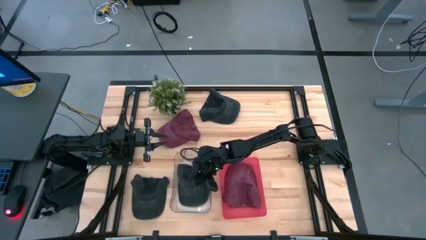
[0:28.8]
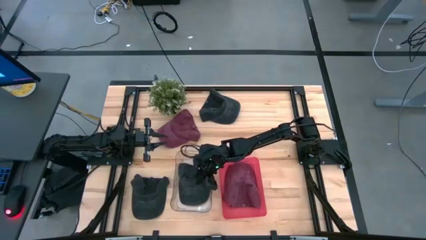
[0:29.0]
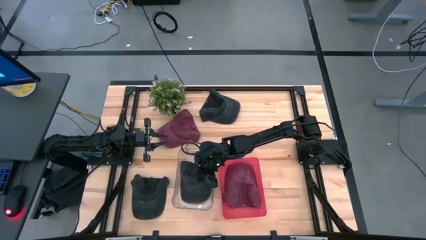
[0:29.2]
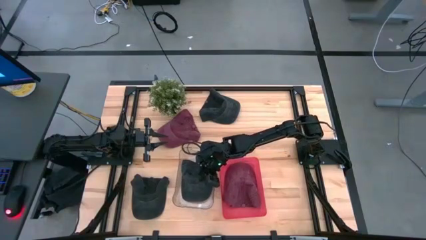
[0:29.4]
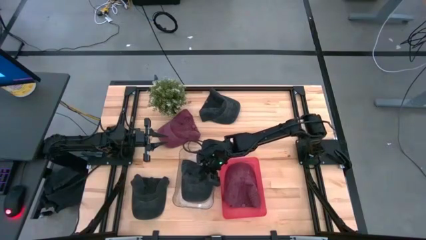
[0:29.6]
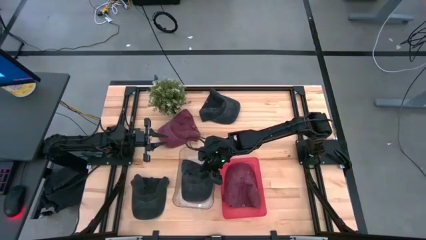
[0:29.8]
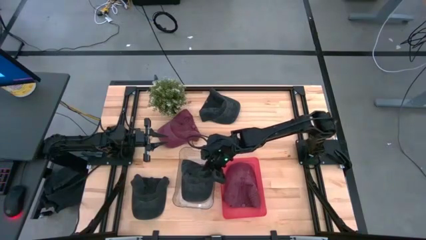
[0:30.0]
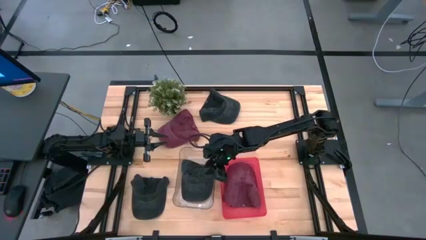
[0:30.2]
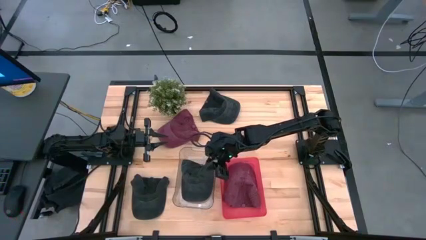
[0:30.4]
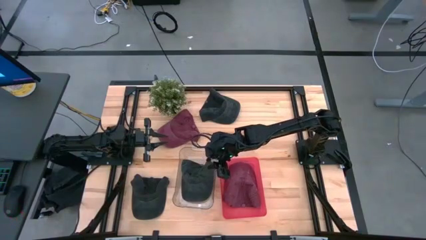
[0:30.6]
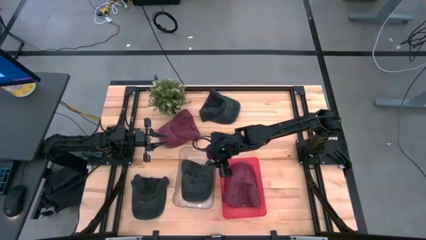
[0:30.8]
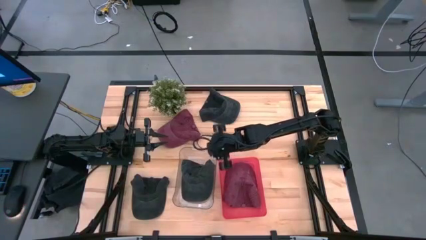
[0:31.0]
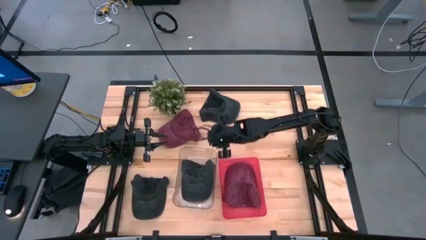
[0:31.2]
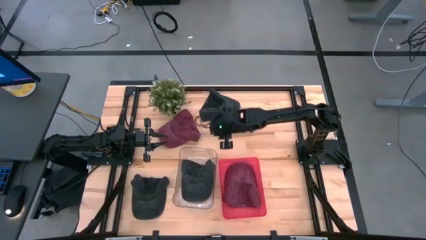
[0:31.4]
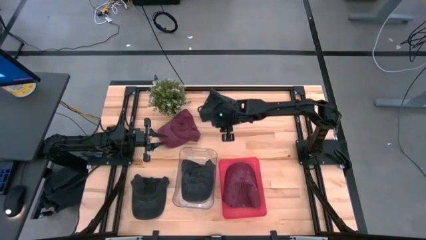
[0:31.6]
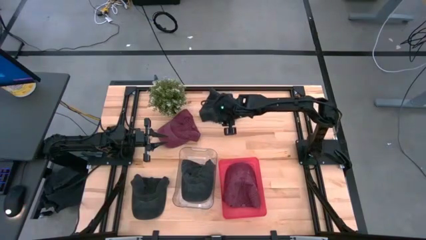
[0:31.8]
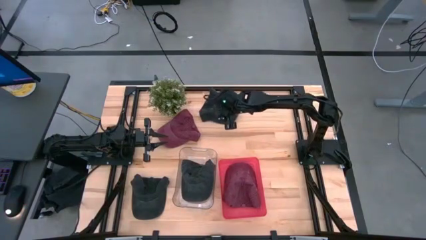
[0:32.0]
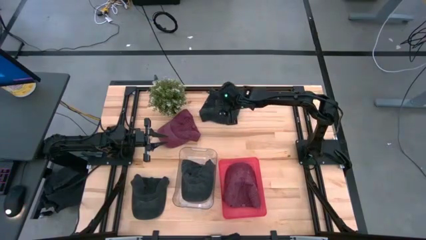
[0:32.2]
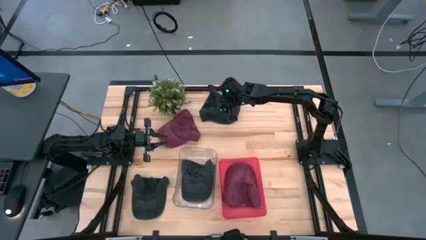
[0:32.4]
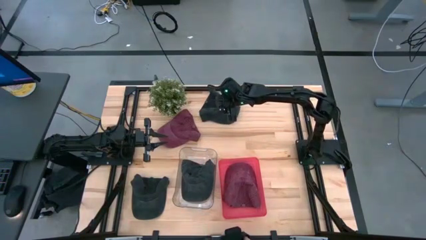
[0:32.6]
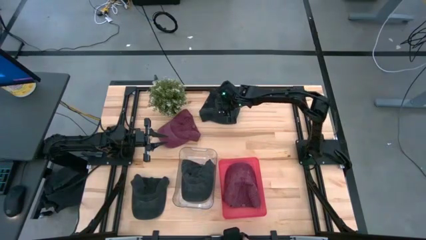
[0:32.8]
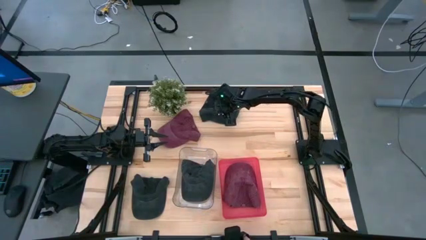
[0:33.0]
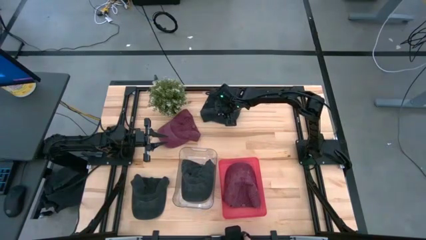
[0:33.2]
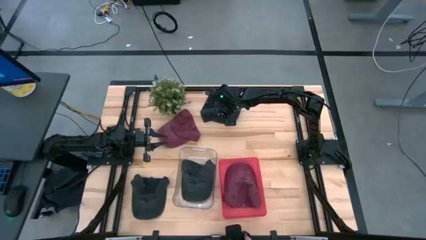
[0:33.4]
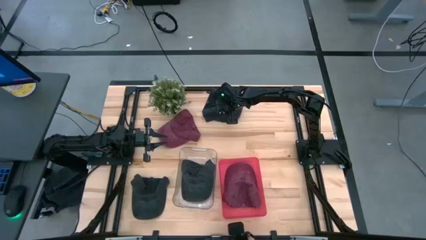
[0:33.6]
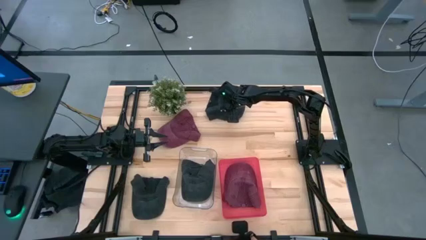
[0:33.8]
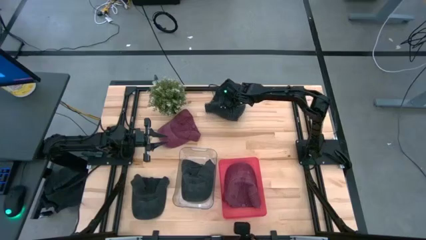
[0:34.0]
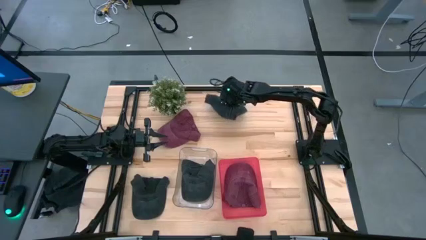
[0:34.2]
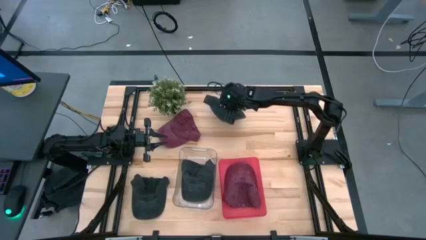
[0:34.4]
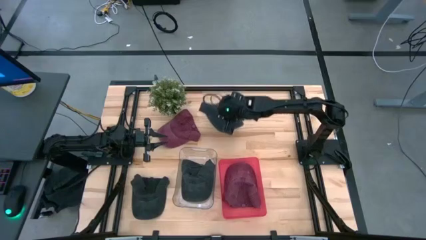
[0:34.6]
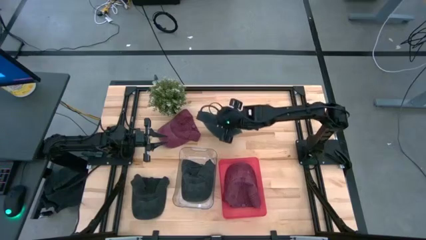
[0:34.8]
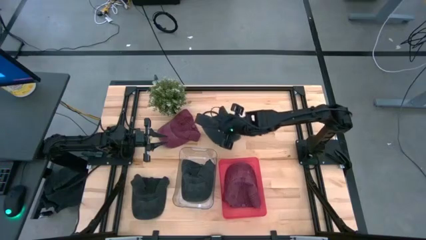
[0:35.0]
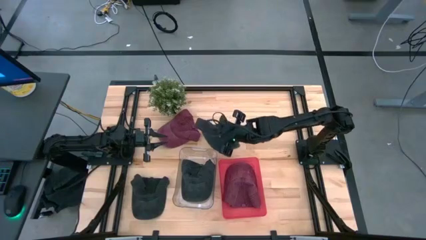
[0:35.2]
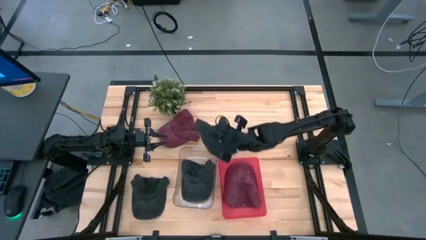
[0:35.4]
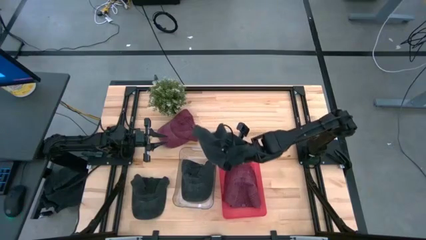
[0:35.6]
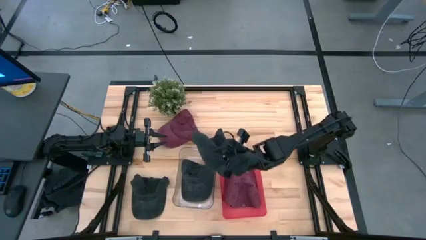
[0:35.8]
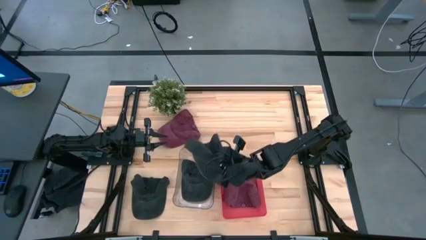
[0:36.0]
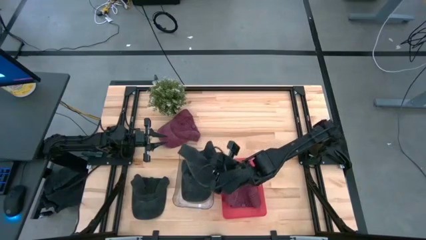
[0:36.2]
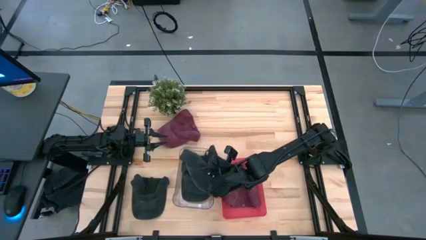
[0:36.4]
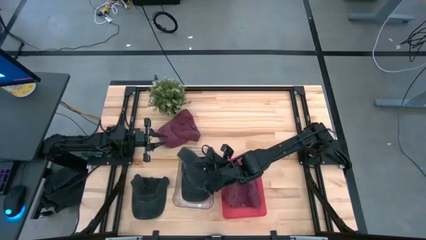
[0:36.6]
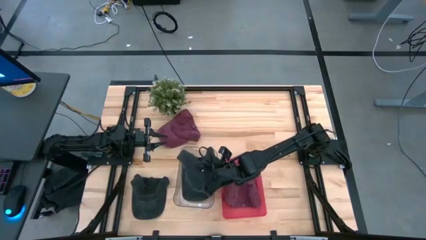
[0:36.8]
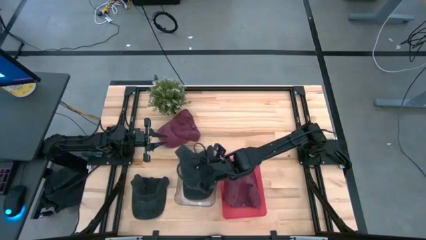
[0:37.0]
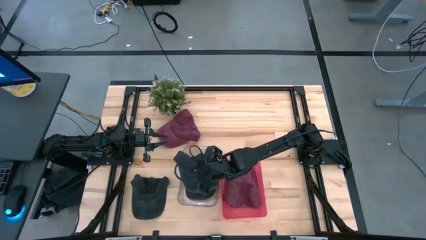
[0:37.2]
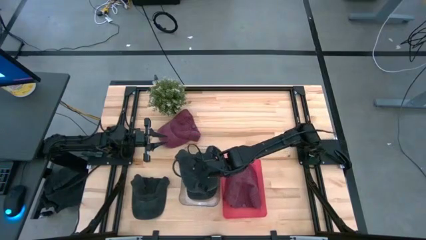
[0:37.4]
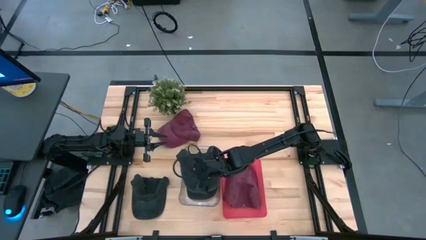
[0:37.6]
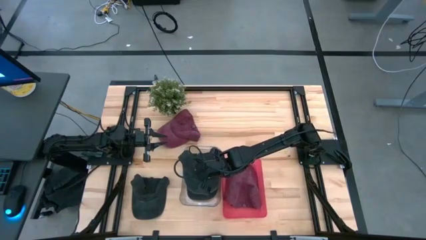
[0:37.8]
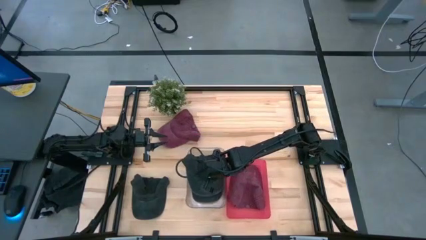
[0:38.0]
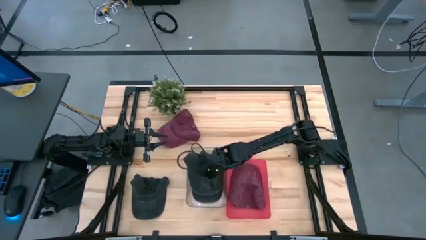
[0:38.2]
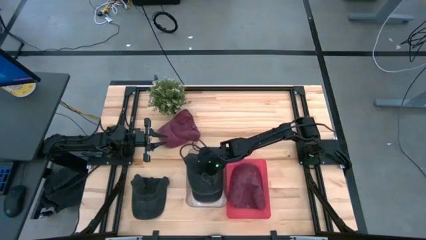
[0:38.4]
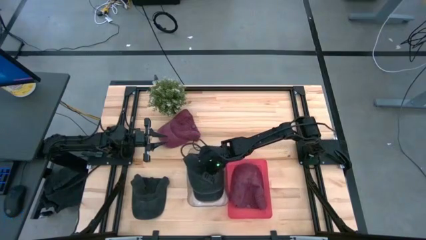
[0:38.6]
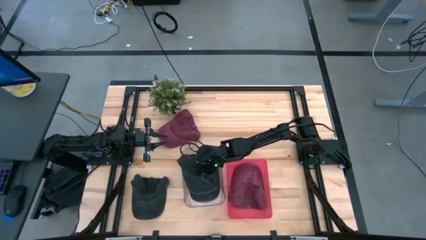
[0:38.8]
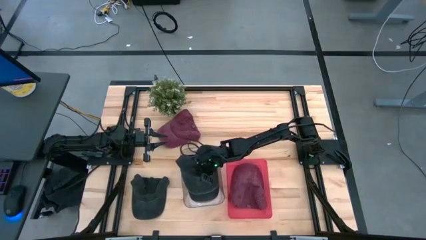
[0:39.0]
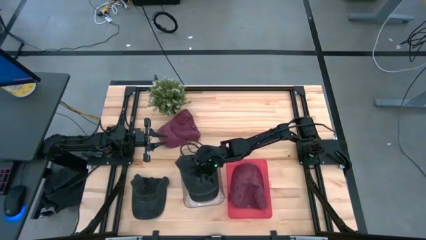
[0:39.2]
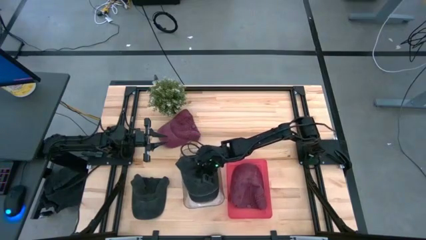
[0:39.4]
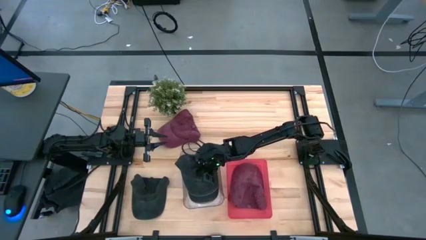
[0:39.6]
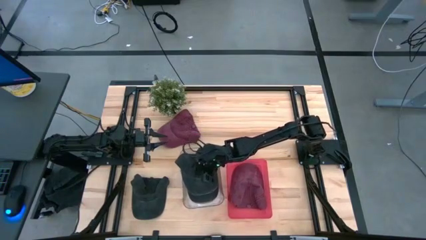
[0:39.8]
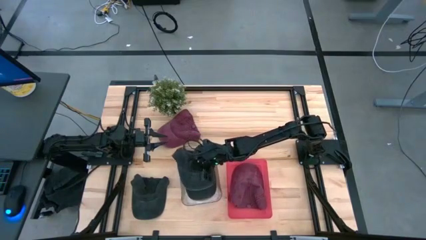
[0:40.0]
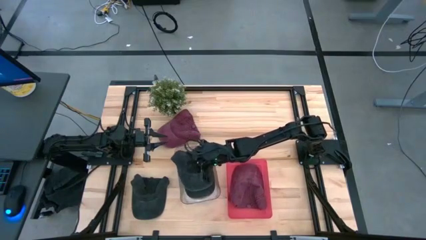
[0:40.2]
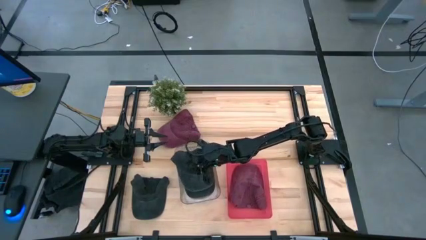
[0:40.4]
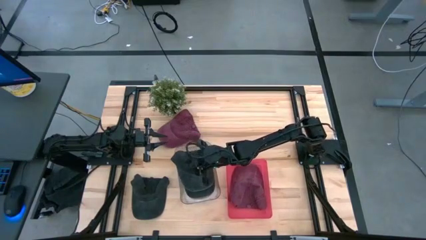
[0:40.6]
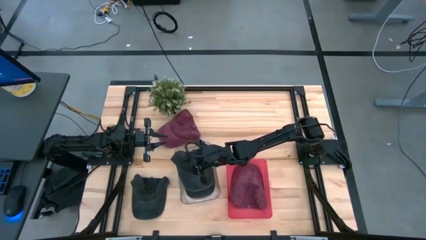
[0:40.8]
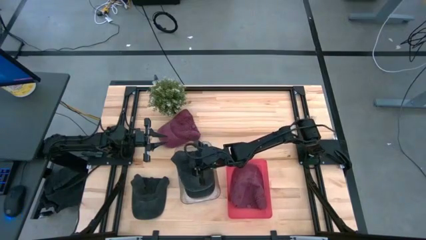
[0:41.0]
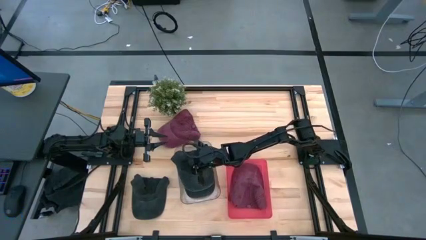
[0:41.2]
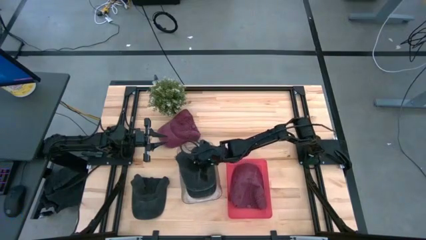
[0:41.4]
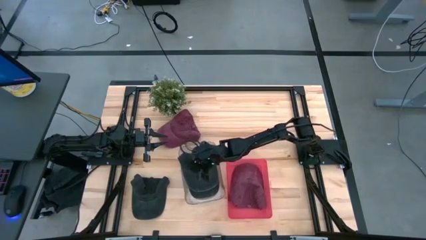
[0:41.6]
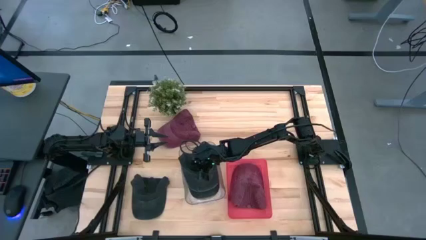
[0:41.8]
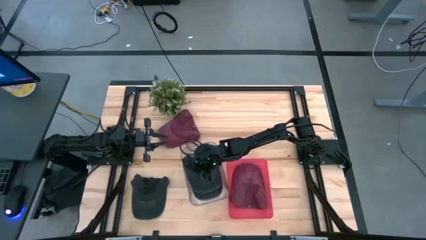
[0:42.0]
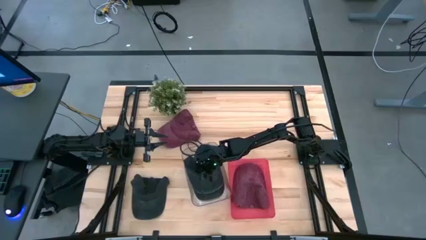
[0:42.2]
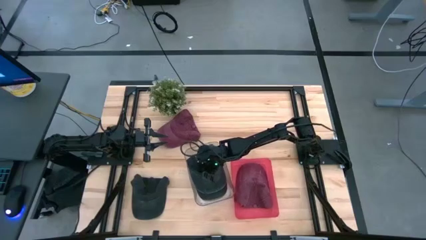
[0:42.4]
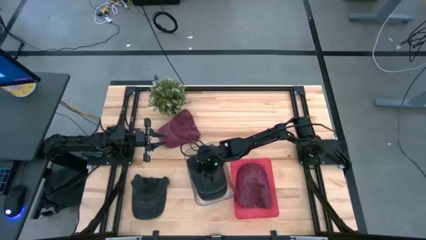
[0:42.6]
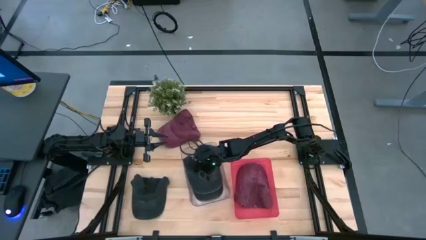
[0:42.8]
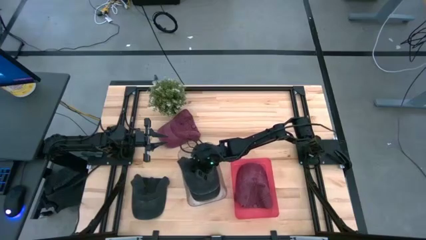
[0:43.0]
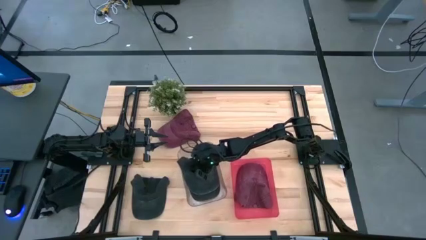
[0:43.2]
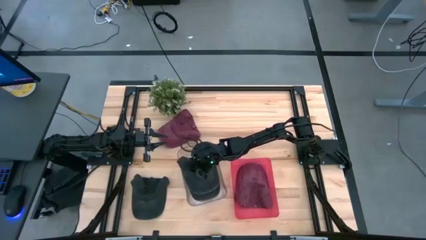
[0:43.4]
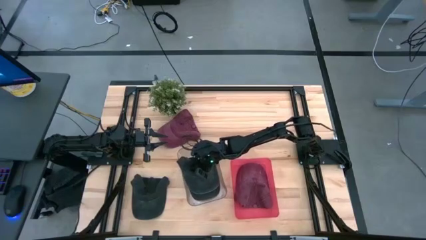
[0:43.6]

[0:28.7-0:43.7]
Task: Pick & Place hat
Put the top black cap in the transparent bin

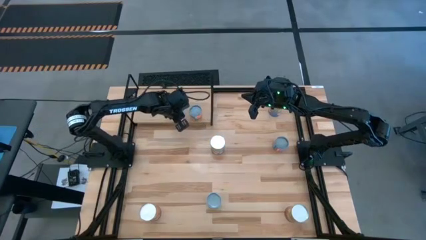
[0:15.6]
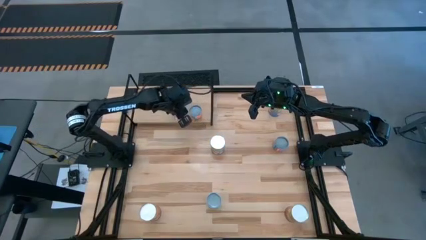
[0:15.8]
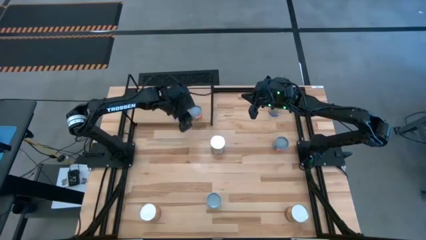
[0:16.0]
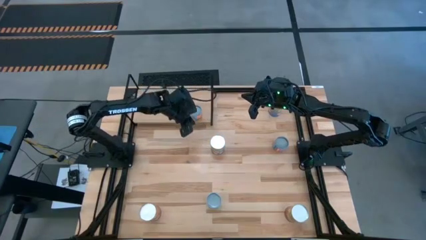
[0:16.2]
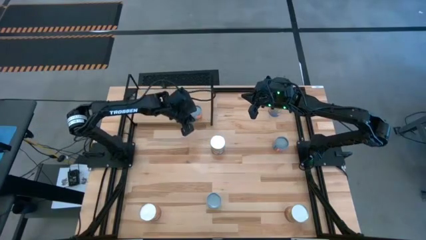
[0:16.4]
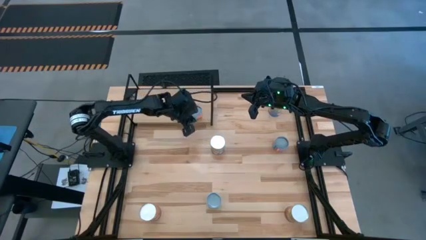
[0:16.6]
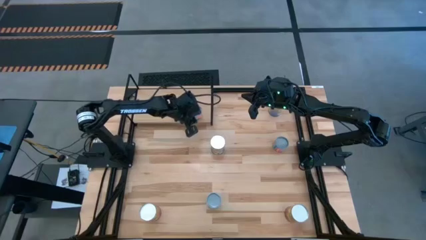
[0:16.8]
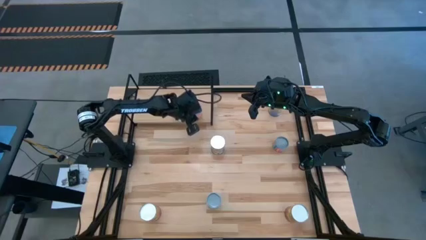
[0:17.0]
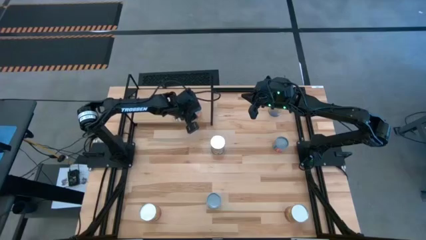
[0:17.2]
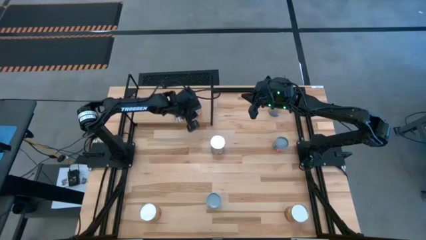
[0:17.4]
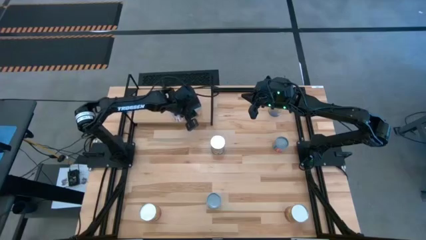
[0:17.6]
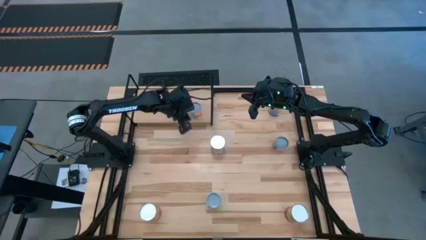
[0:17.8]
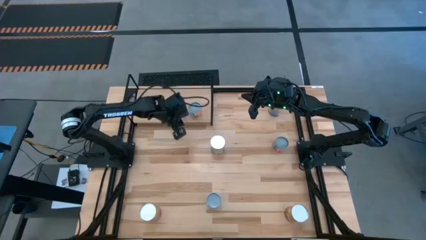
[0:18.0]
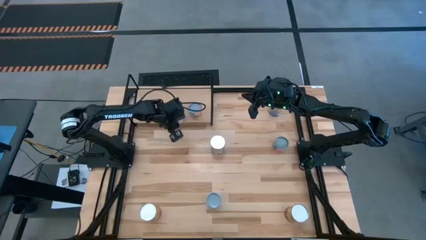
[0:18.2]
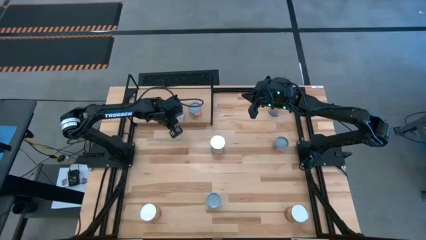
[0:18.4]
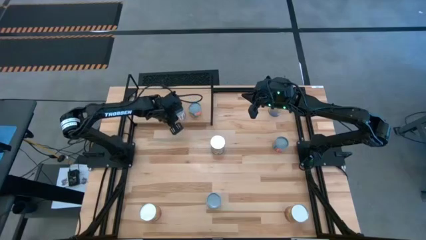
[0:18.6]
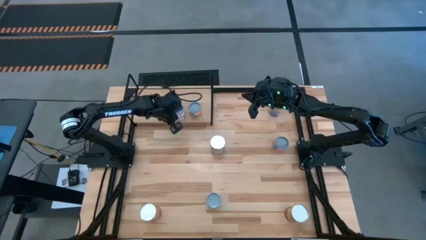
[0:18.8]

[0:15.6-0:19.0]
Task: Pick and place cans onto a shelf
Adjust the small canned goods on the shelf
